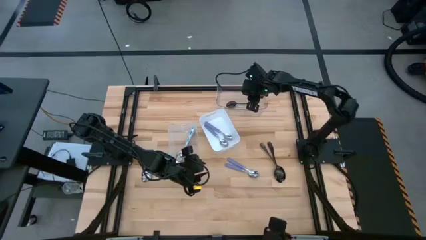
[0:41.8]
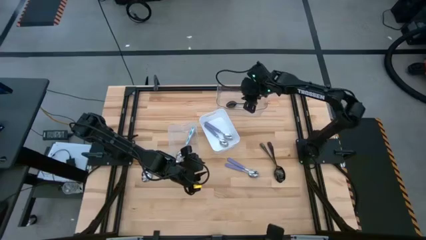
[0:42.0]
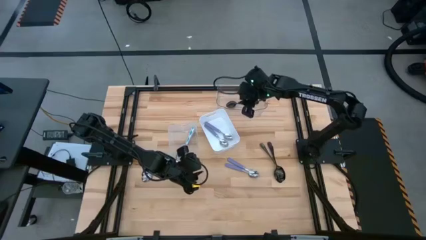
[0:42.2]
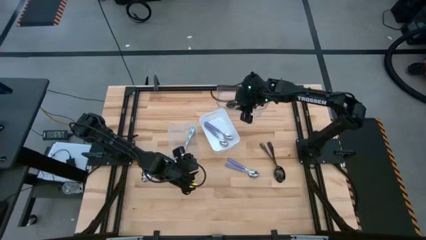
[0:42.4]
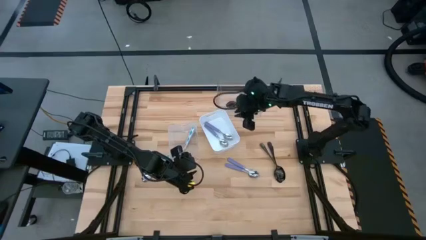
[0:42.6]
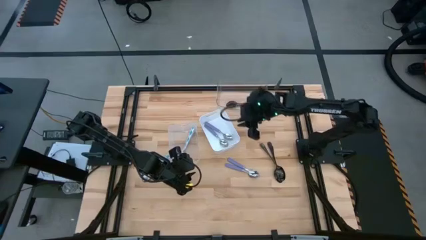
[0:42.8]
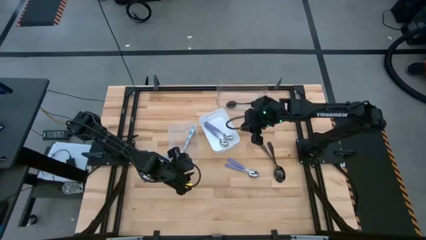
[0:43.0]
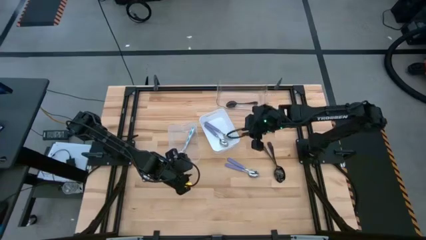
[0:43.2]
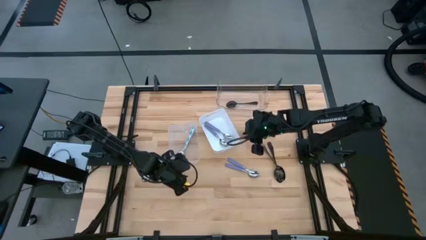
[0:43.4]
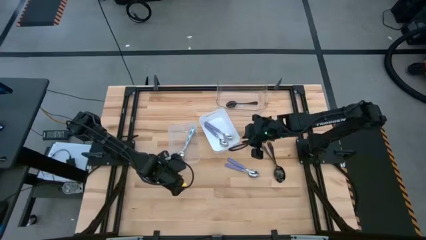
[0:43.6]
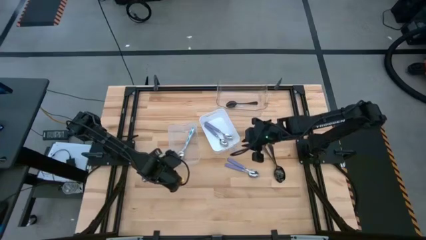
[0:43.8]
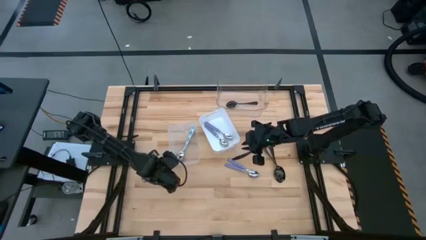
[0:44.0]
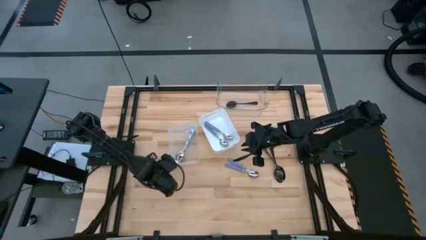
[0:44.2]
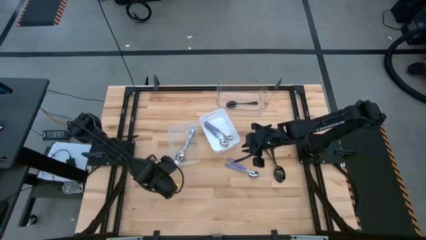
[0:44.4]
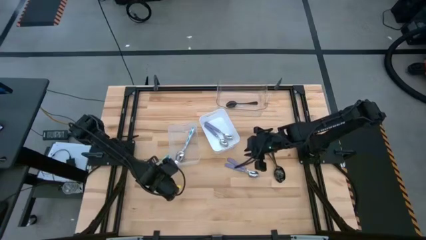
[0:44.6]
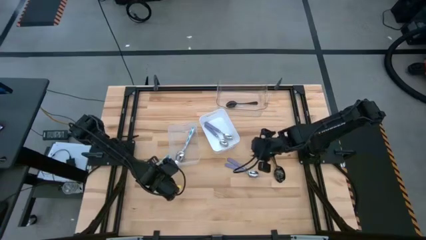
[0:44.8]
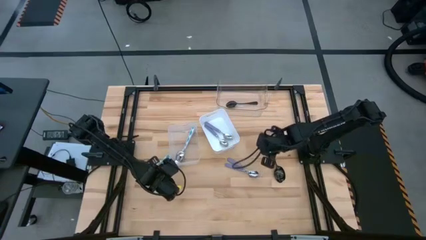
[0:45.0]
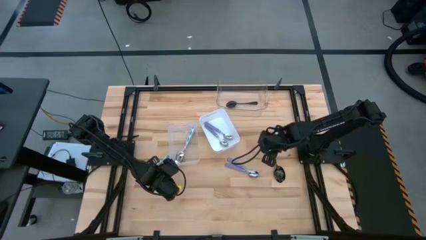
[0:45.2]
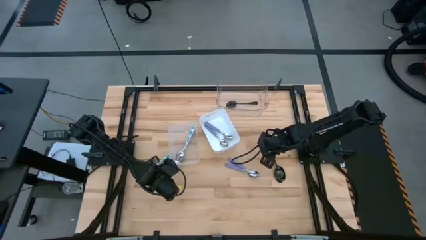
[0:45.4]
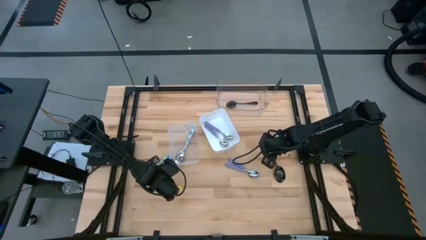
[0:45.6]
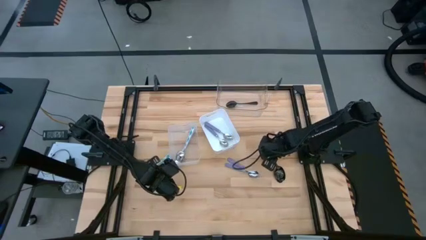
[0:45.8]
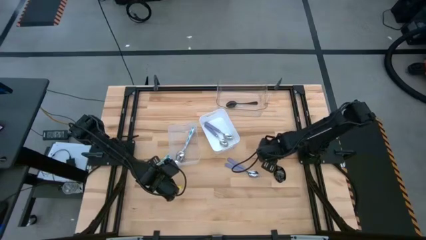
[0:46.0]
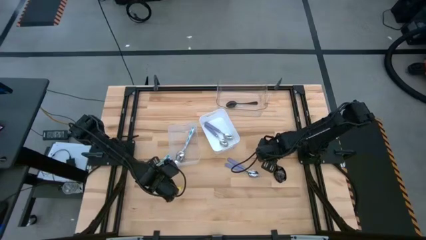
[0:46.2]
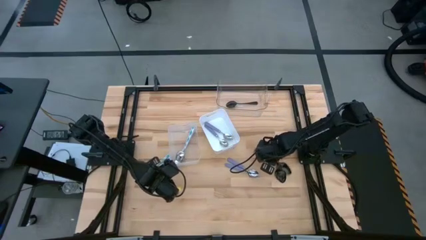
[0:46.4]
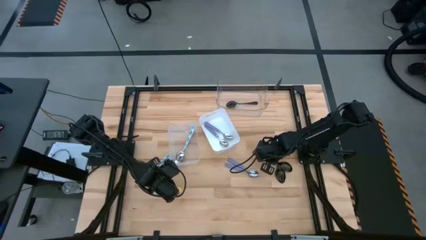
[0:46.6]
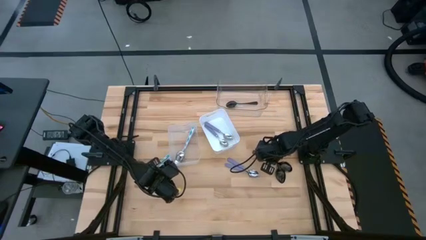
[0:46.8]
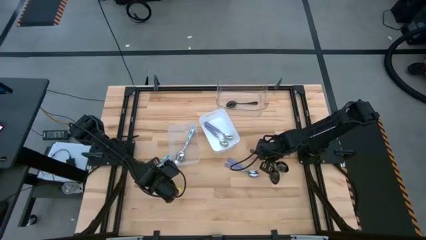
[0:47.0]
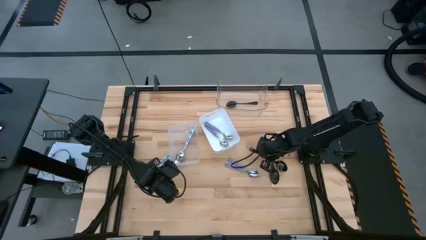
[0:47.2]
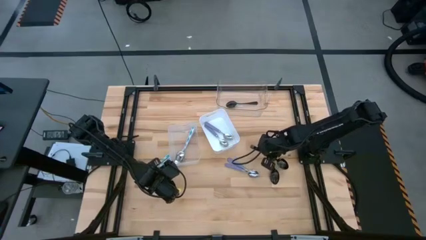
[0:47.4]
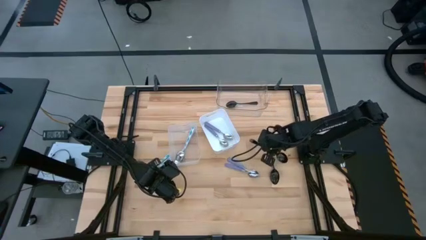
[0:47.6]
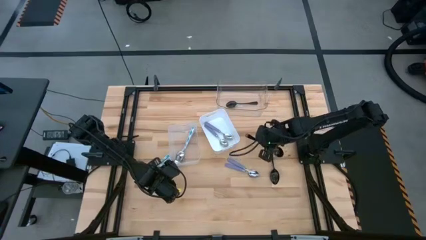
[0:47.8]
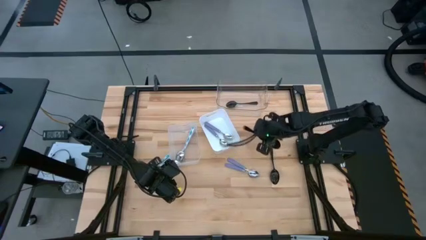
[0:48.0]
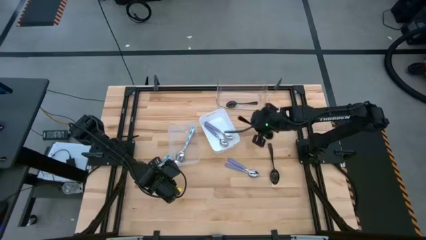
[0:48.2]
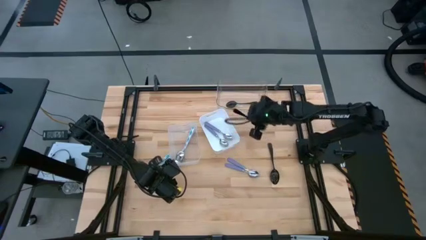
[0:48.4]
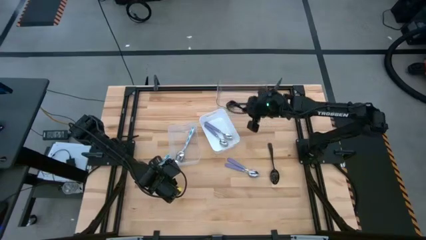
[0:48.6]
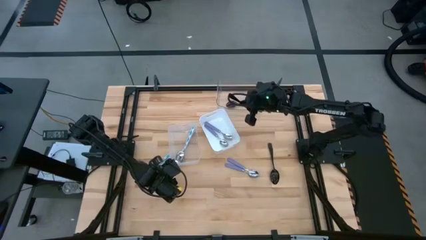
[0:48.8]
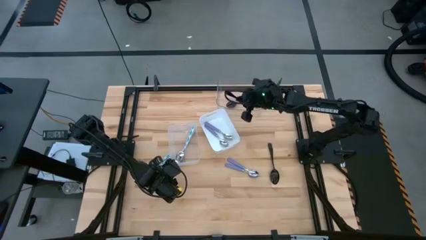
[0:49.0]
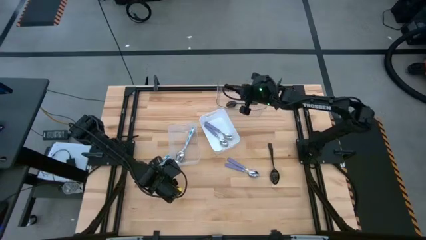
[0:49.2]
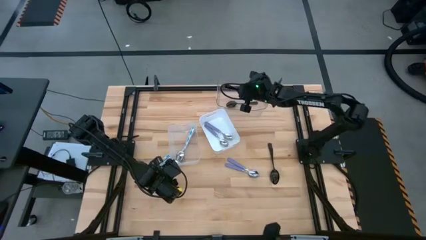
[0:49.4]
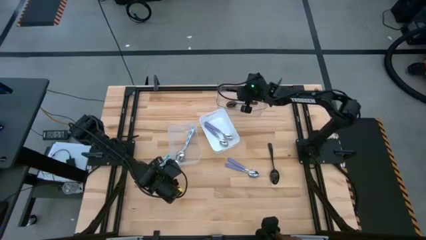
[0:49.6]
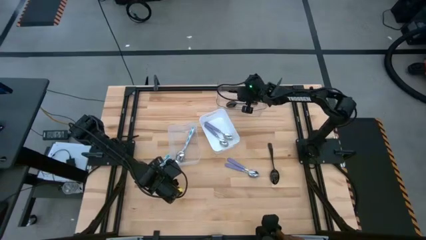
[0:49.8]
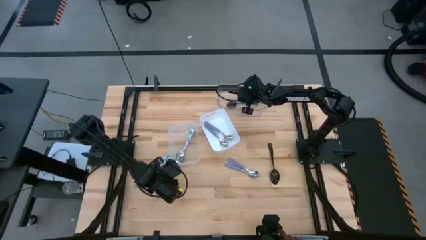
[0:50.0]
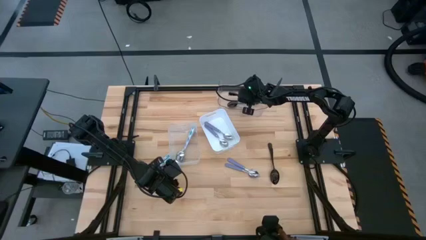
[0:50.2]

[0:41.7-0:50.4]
Task: Sort silverware by color (type)
Put the black spoon into the top transparent bin

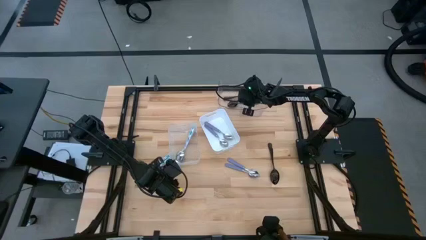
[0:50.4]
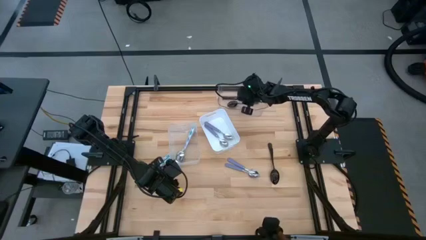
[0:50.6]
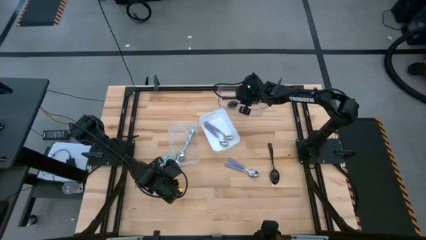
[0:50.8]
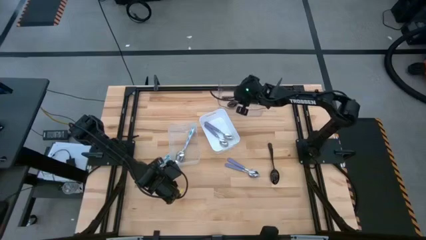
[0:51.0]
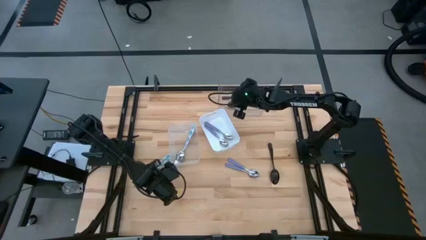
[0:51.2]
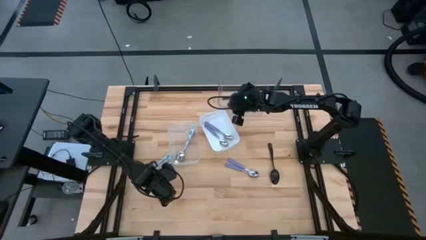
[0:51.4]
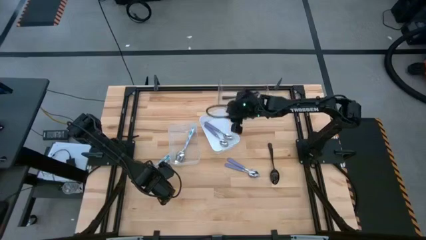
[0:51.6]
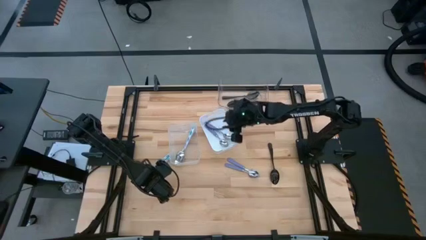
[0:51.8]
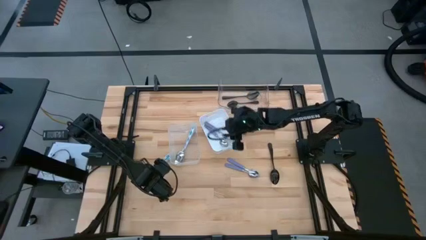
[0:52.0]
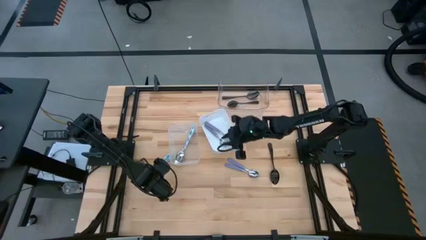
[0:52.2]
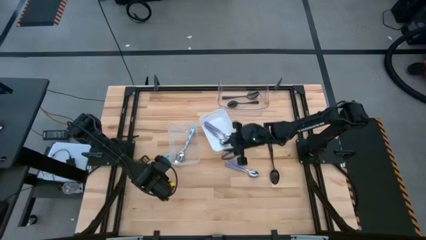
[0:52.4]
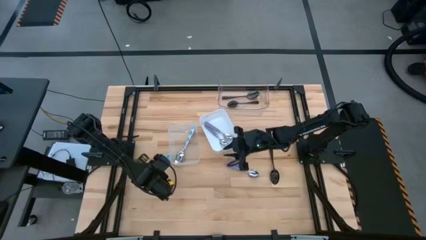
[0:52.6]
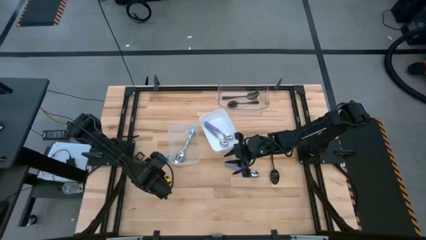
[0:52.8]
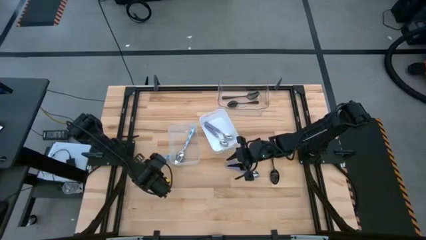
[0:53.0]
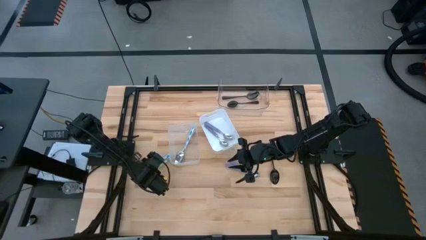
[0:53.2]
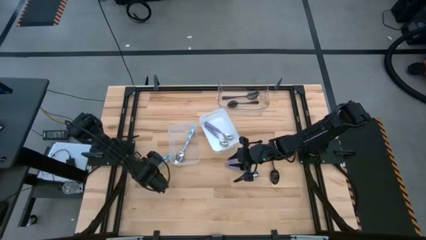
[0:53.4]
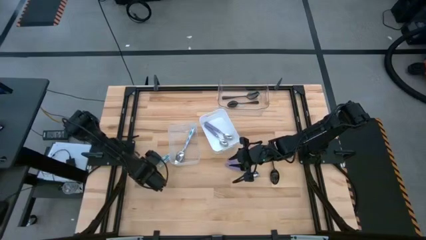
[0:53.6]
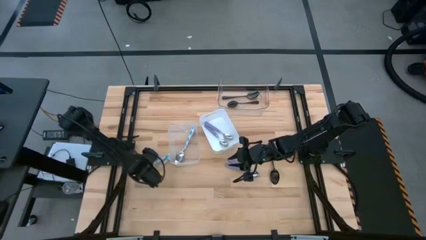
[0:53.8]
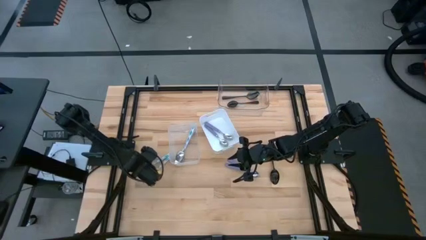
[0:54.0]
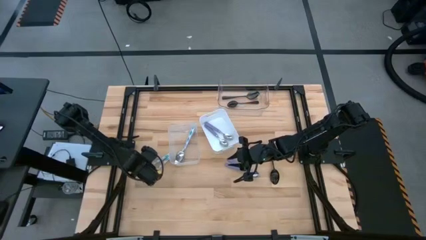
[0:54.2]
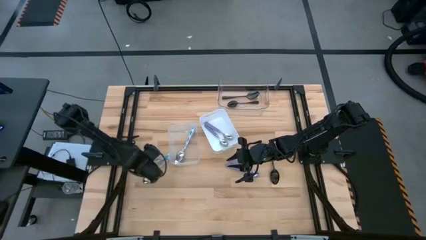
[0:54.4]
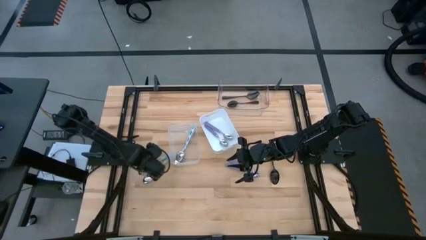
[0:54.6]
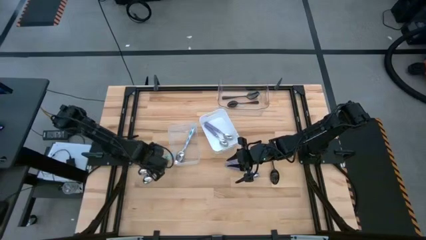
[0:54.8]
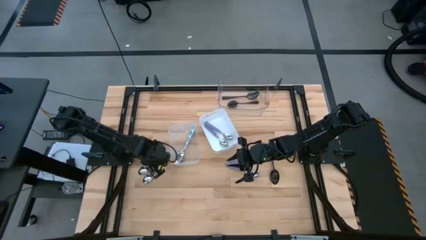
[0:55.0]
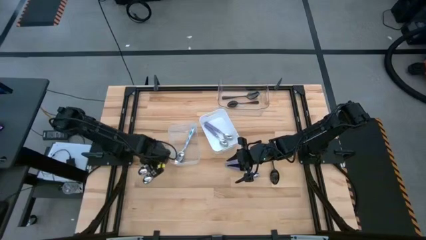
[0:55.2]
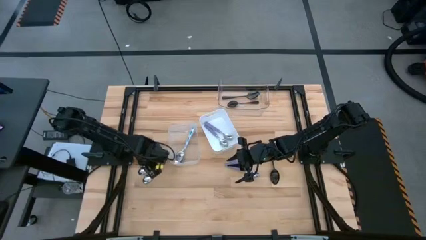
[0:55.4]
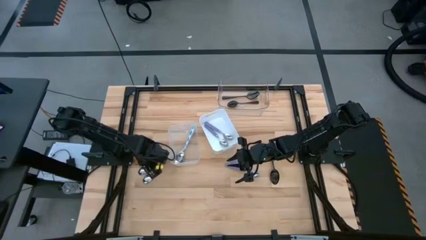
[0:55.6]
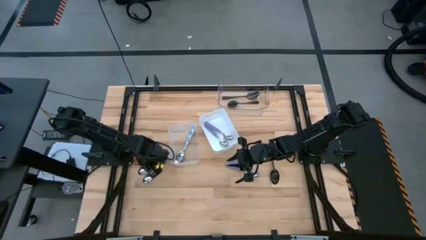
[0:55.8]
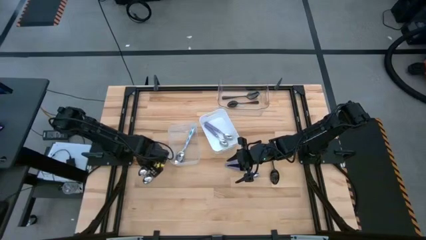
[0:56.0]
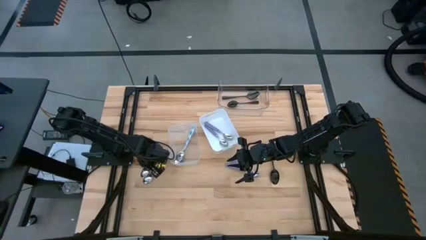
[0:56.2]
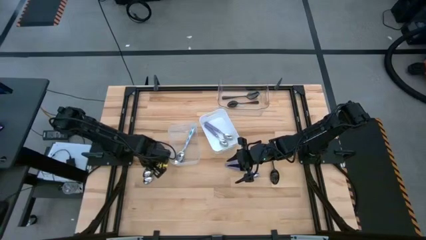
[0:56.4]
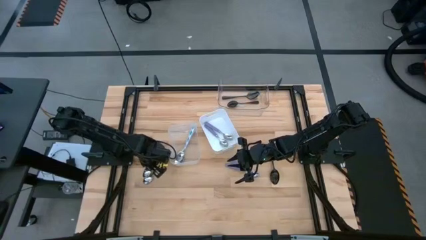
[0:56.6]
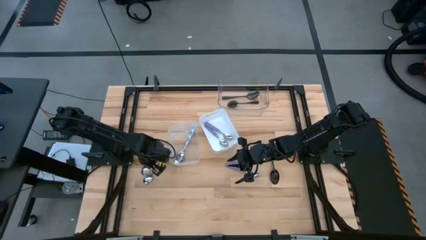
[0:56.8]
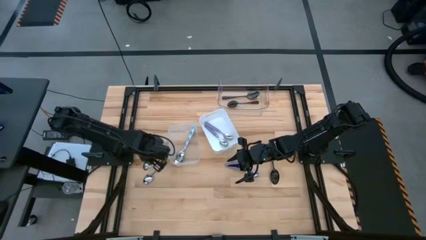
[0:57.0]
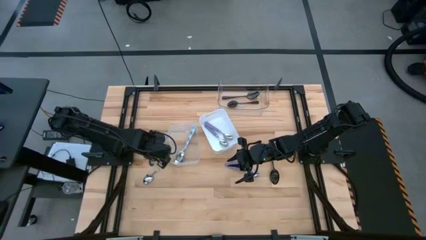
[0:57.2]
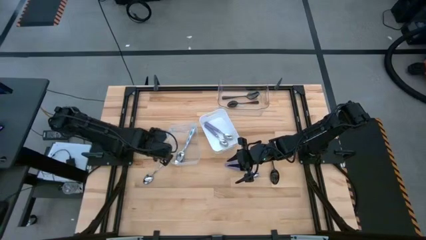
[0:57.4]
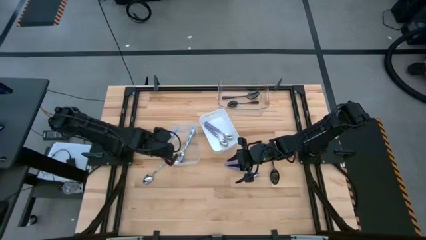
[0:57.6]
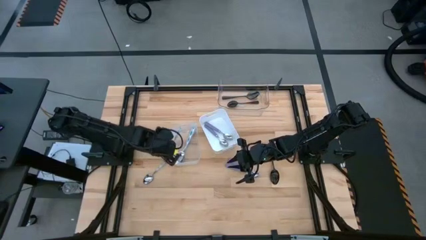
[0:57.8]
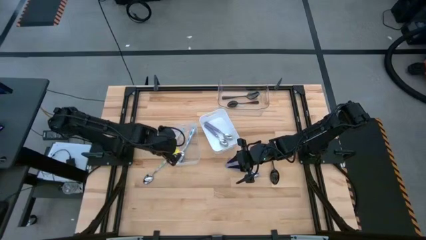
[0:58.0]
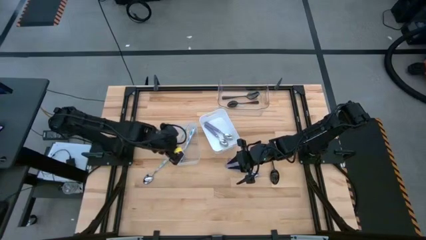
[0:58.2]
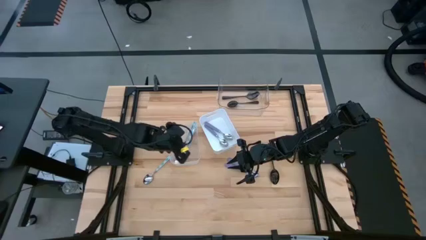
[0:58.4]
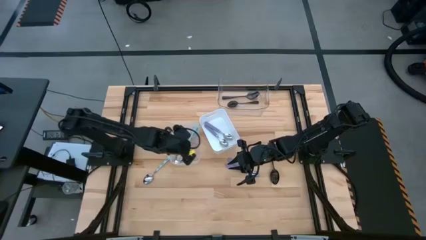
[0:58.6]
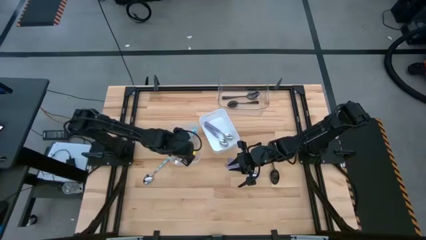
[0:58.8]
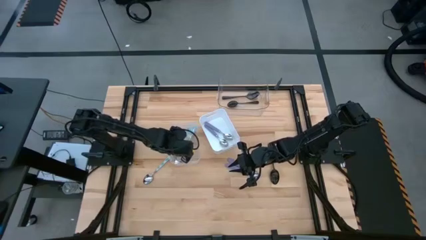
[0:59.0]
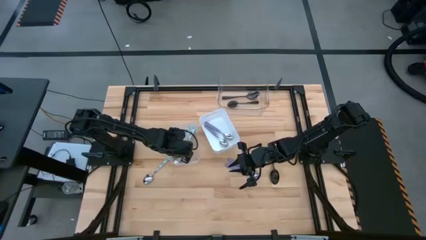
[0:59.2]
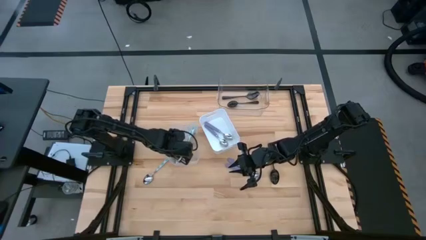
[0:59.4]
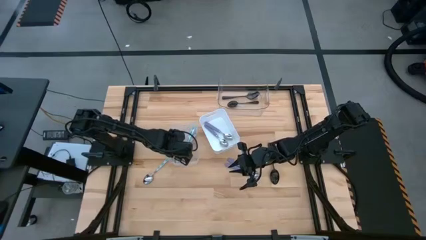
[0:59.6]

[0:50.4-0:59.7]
Put the white-green patterned spoon into the bottom transparent bin
